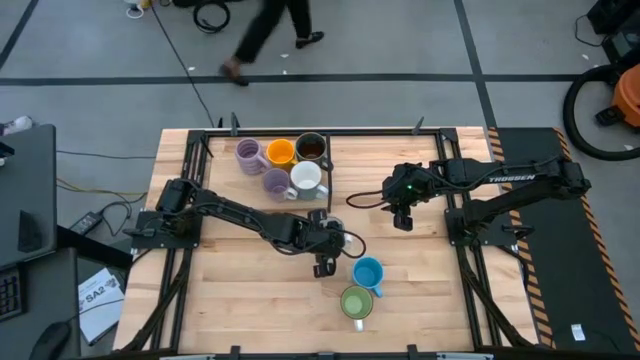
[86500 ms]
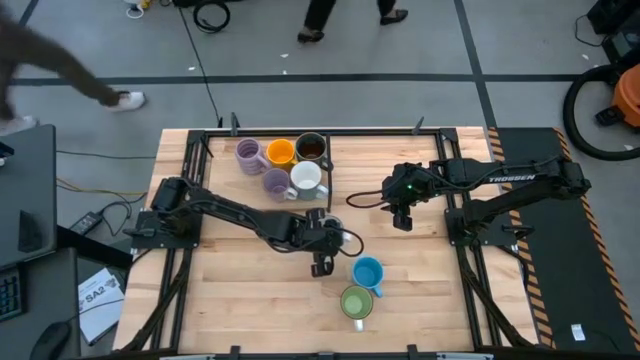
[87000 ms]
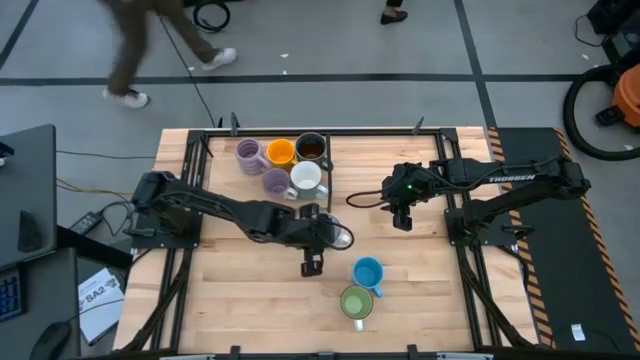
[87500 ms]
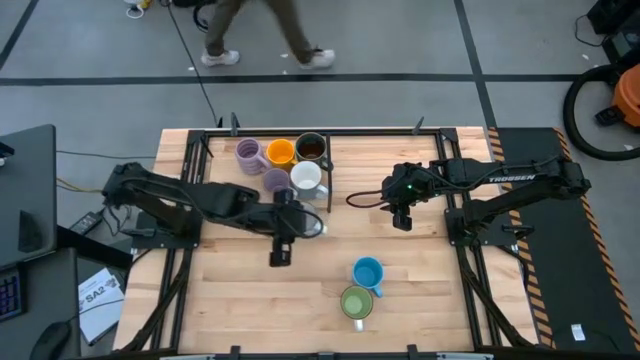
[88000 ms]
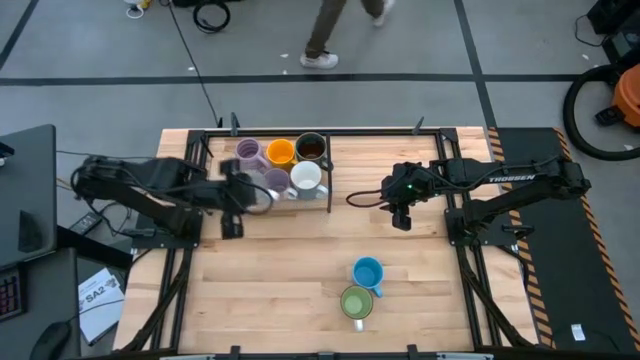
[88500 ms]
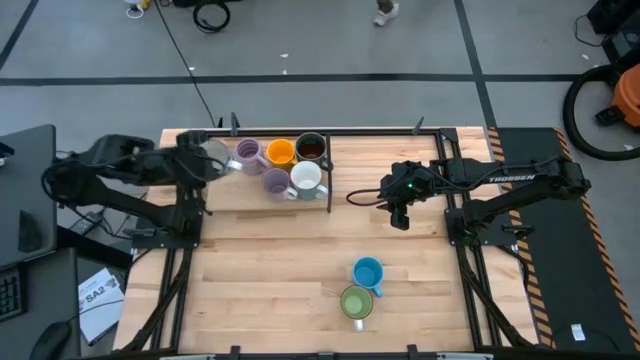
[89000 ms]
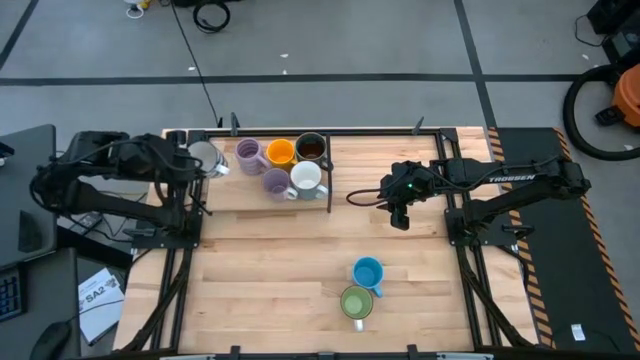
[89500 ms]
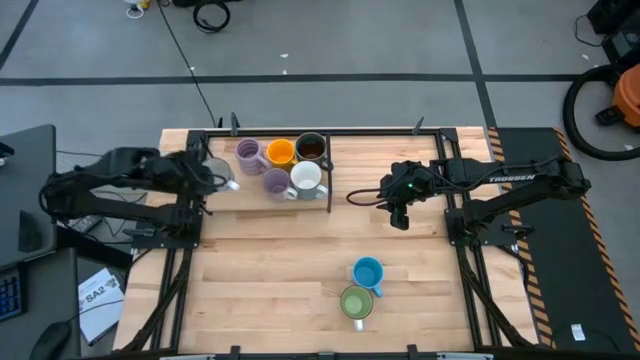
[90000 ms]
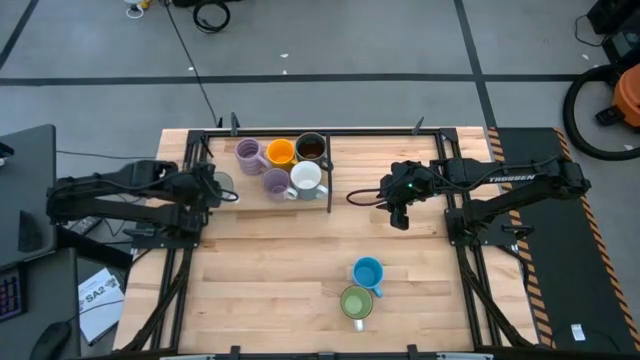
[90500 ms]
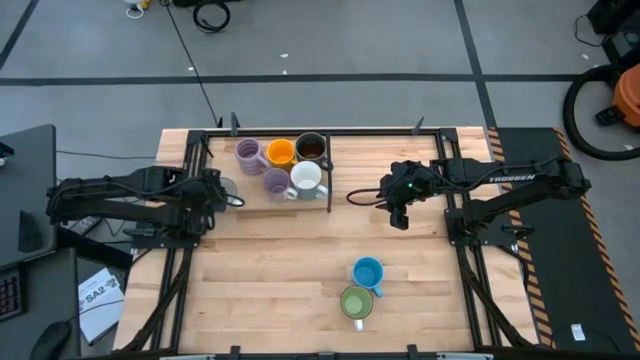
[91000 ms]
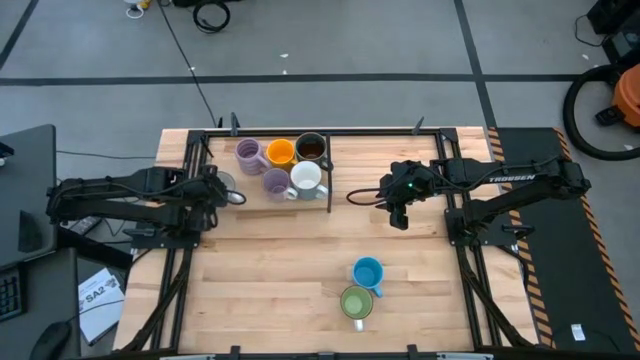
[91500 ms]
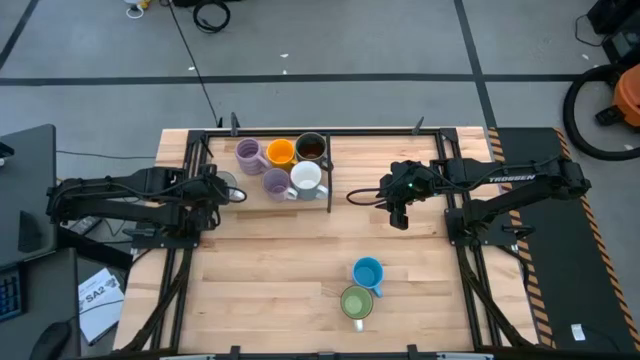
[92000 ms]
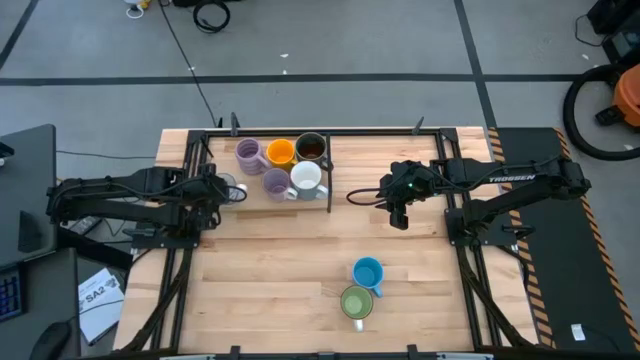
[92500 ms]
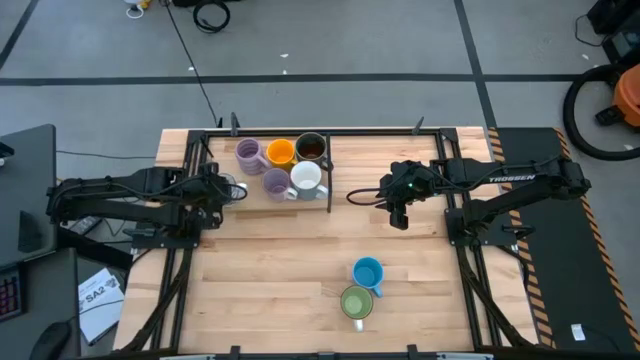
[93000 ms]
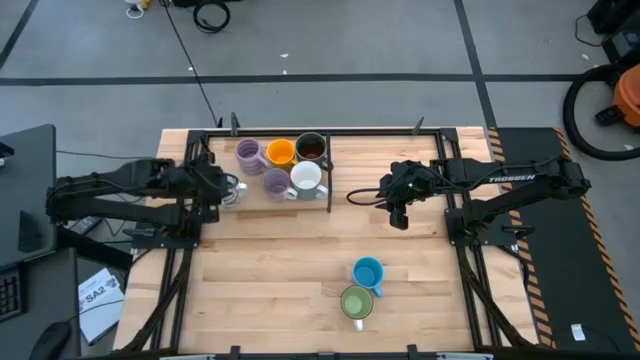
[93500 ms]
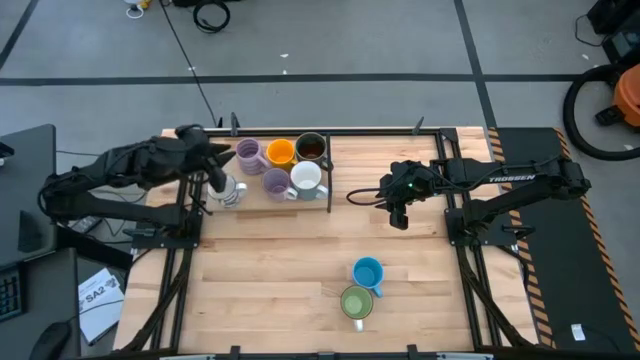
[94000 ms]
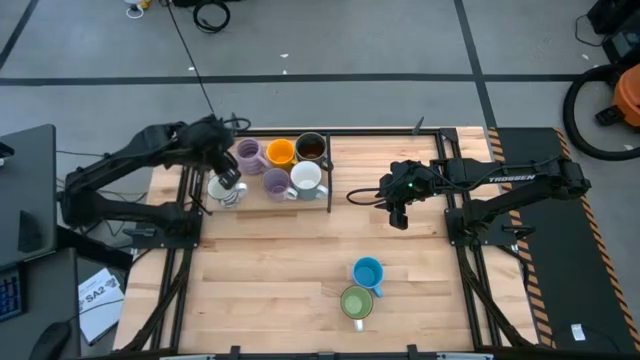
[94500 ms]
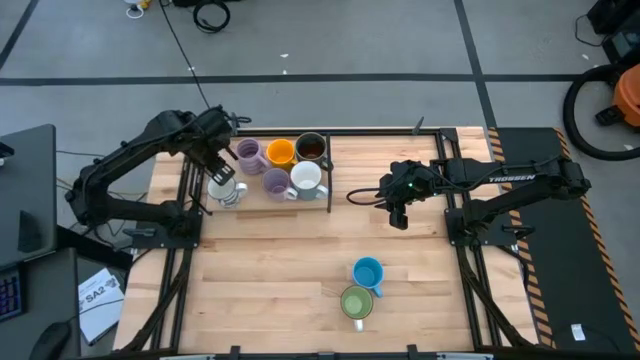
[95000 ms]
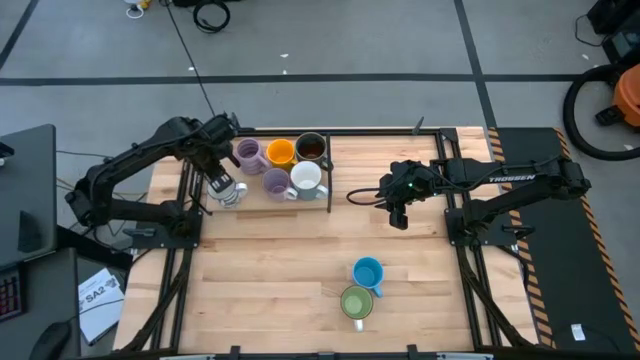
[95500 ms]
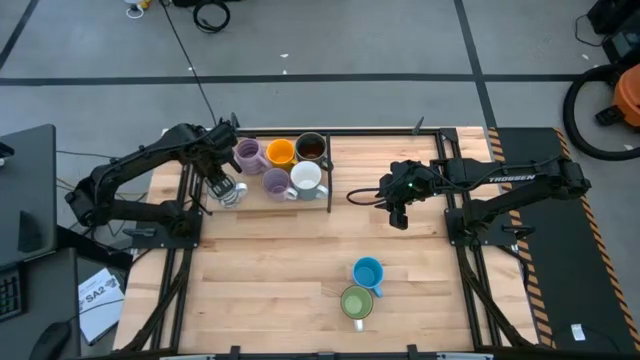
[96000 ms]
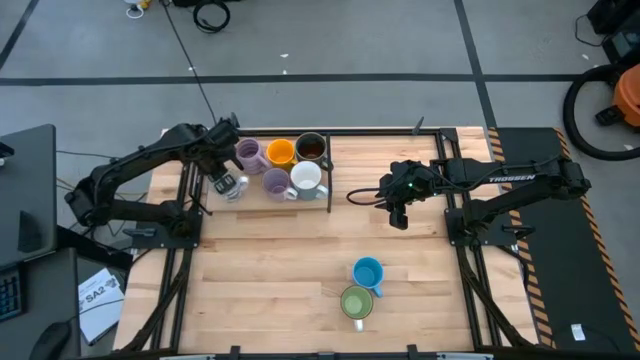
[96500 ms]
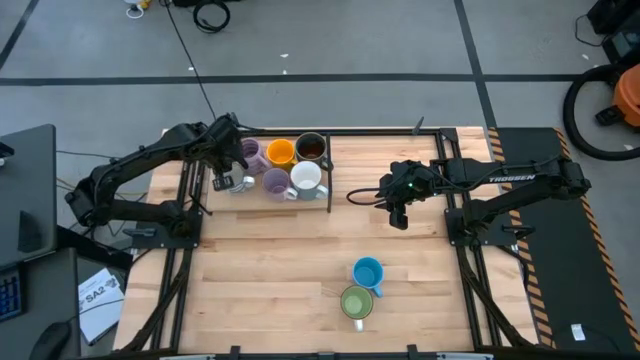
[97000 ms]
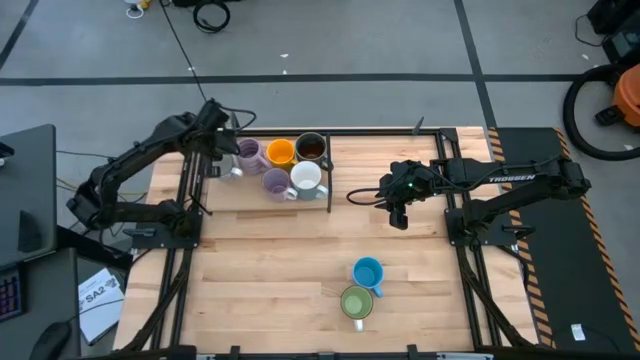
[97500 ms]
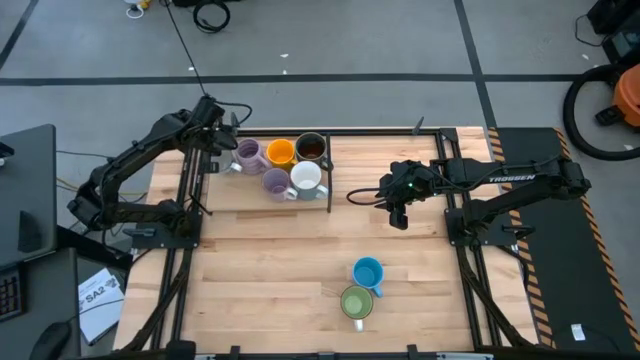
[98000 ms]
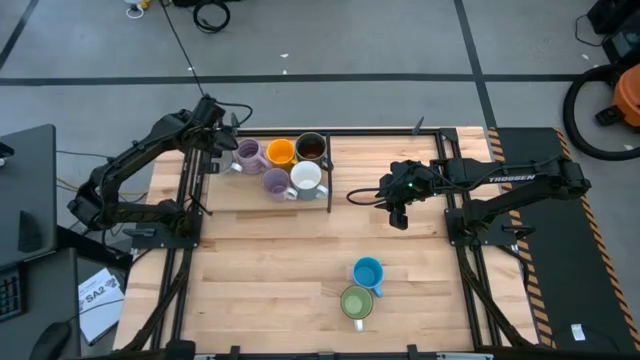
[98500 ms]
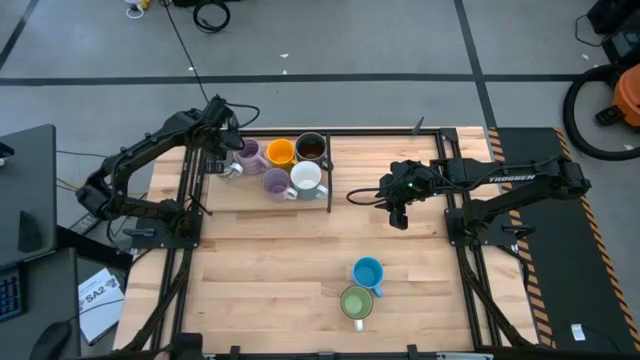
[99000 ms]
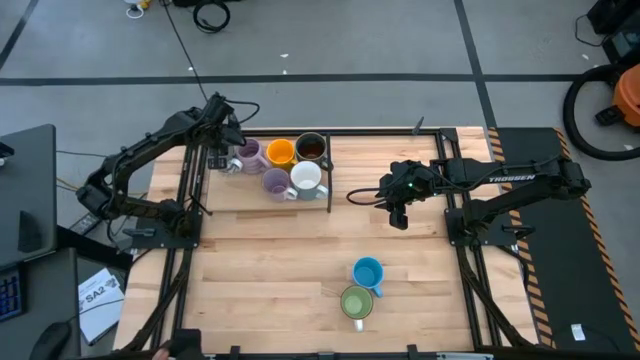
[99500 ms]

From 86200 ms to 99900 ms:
Task: Place coffee mugs
Put the patterned blue mug on the shelf

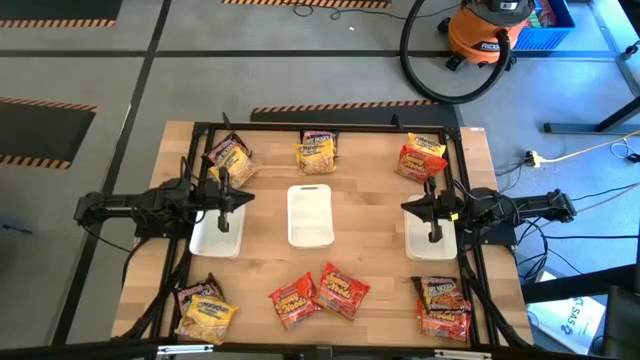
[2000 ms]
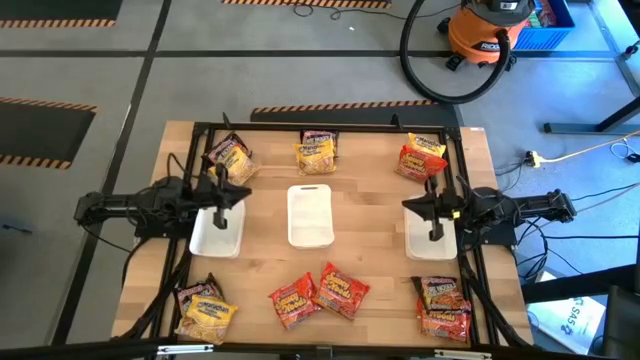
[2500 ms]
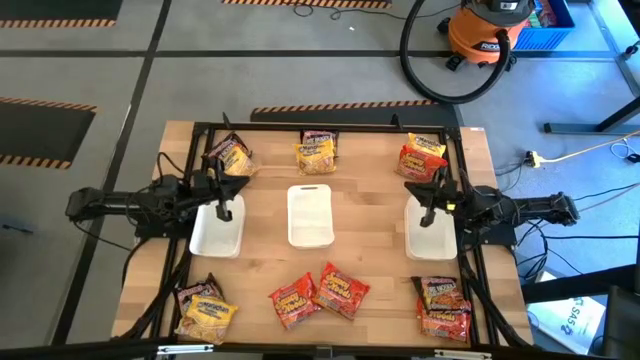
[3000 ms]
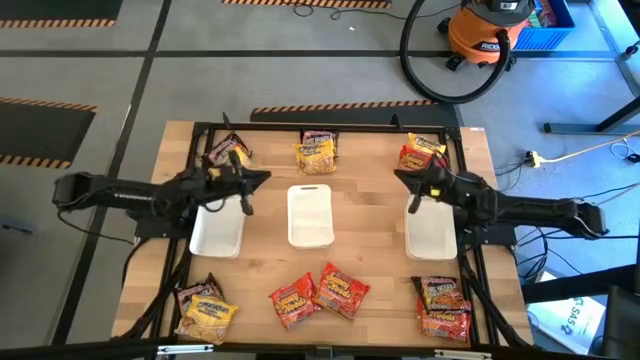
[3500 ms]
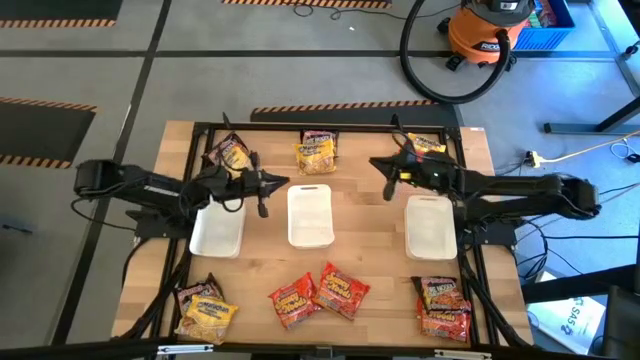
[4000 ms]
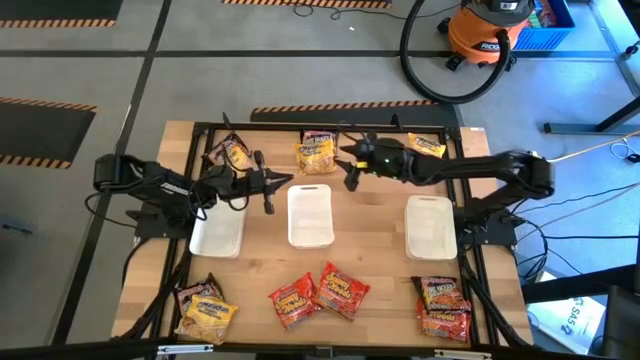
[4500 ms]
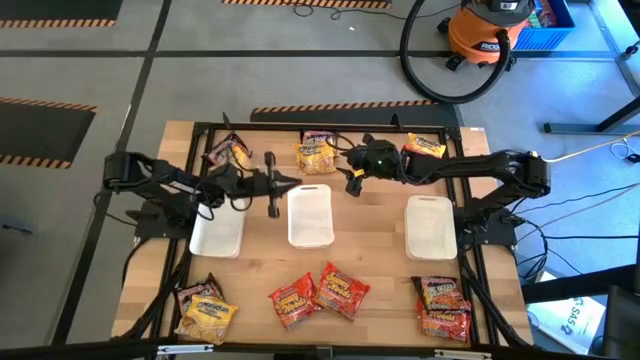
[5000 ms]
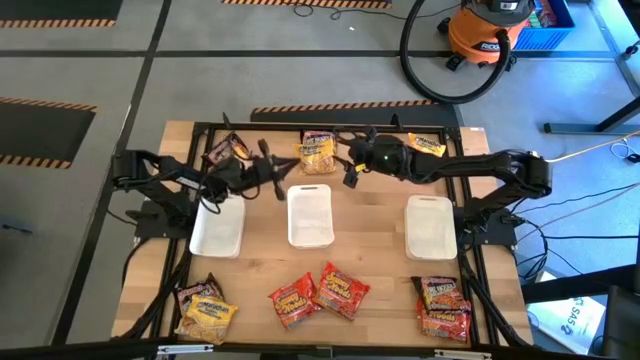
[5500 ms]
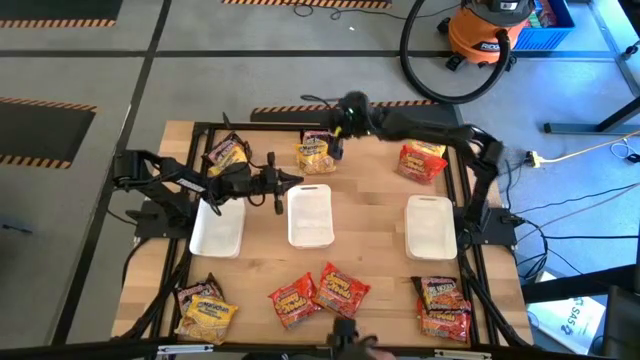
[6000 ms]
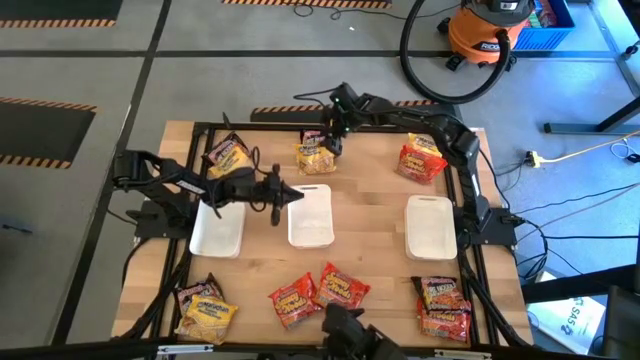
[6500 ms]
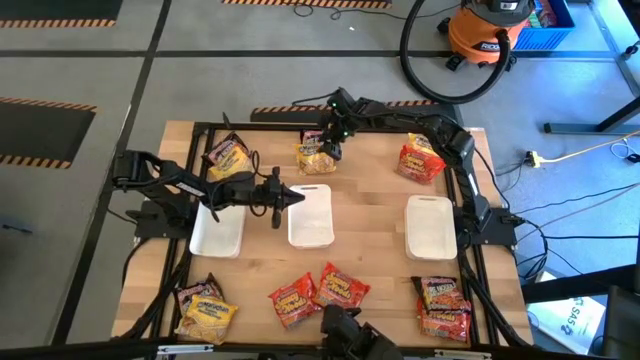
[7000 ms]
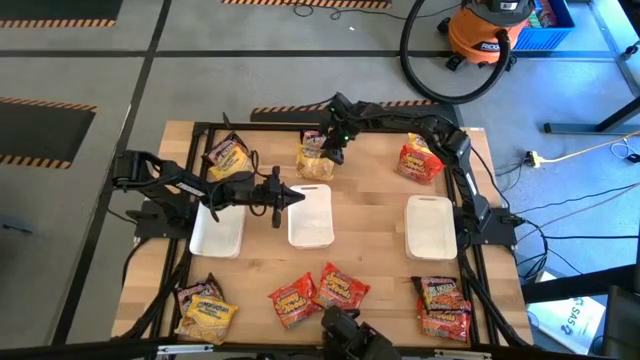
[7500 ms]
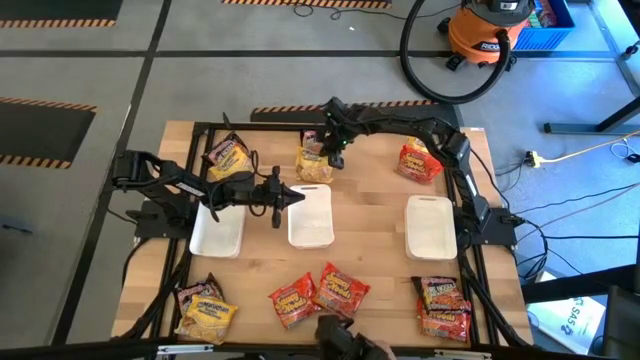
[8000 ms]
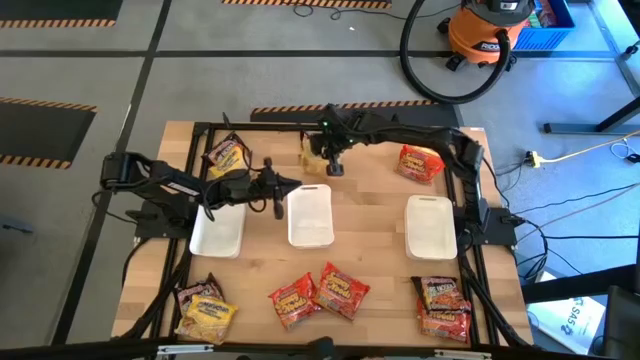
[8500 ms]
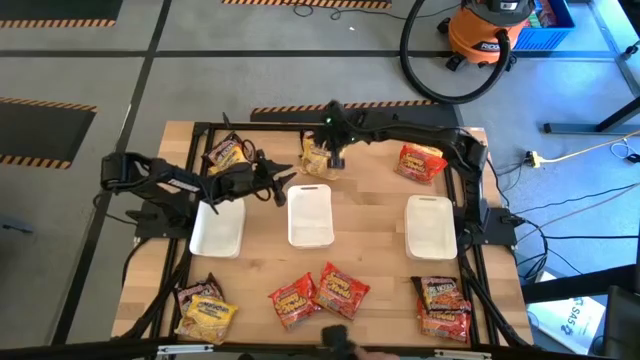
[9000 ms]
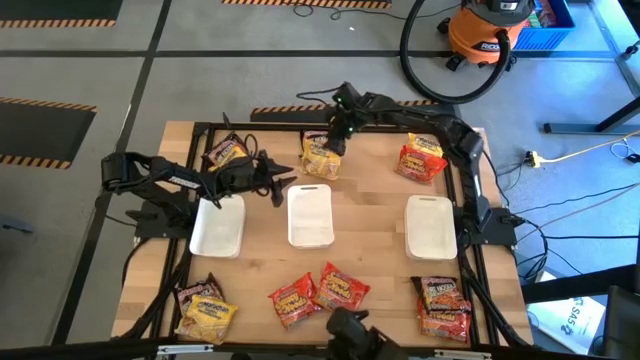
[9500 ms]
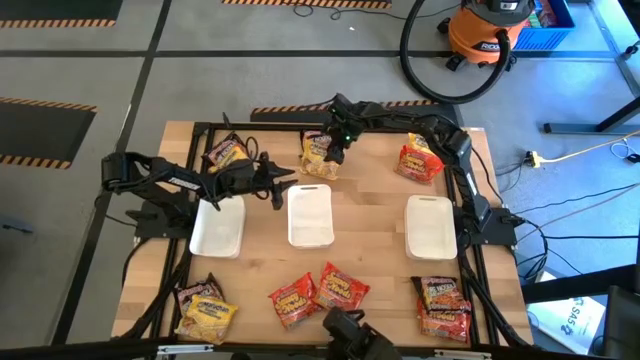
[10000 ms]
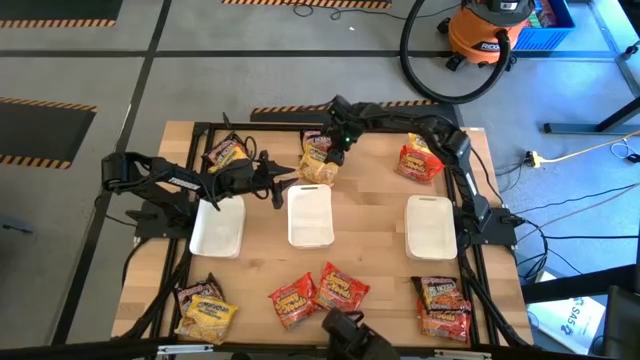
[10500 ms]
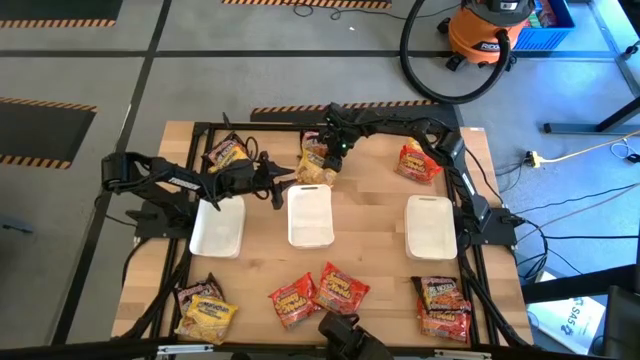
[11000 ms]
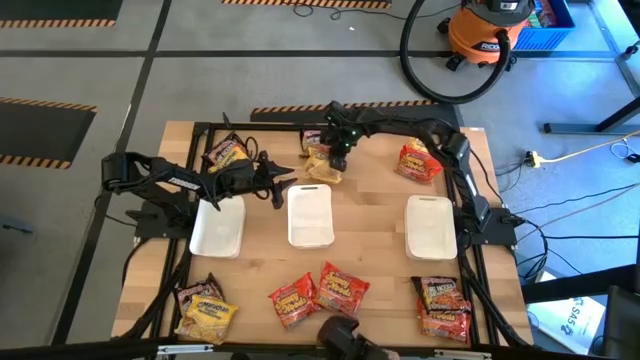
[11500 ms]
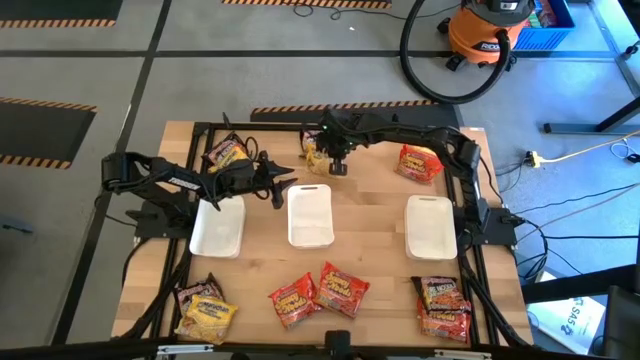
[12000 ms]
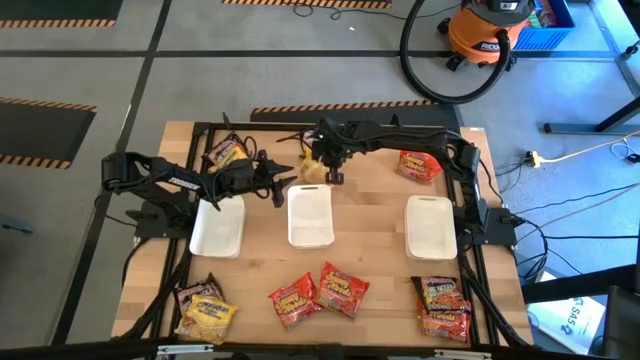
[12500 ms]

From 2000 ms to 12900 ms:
Task: Sort Maruchan noodles
Put the middle top yellow noodle pack into the center white bin
